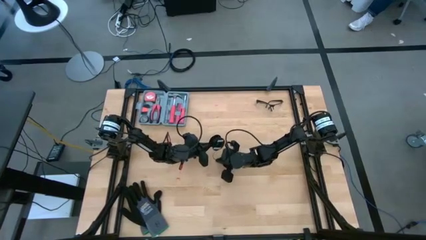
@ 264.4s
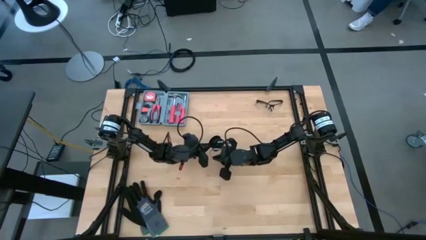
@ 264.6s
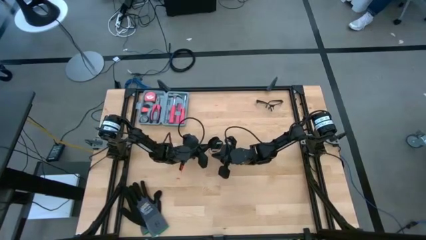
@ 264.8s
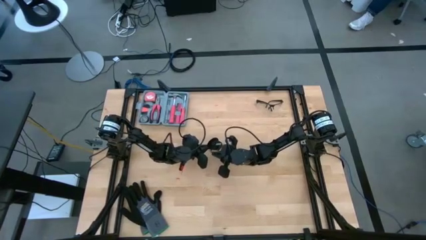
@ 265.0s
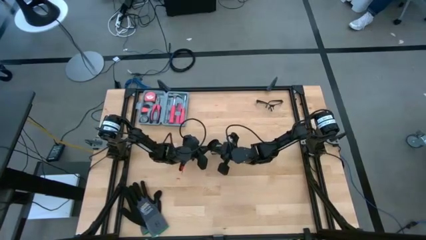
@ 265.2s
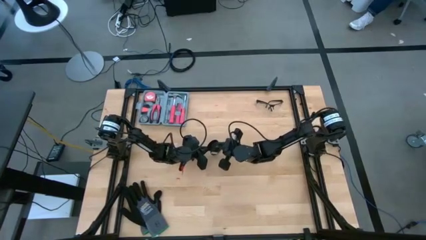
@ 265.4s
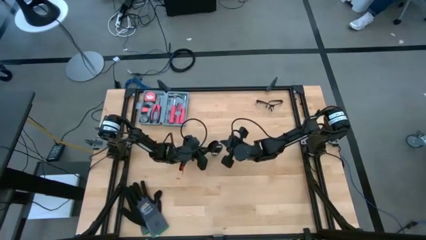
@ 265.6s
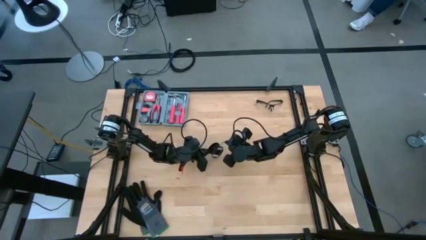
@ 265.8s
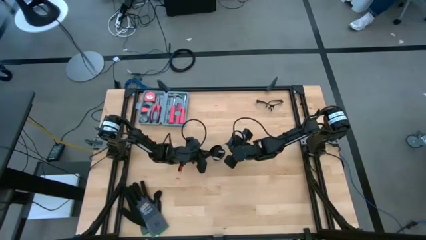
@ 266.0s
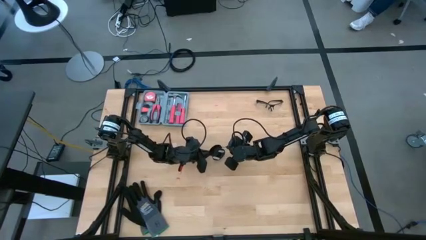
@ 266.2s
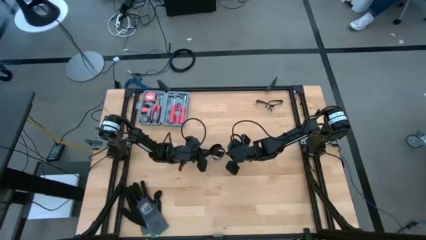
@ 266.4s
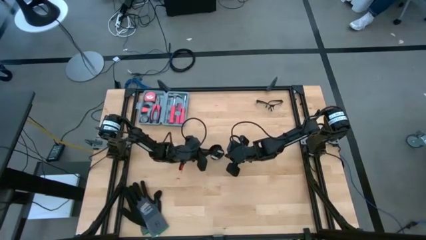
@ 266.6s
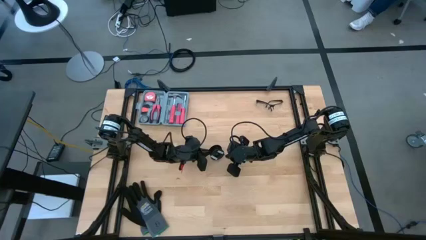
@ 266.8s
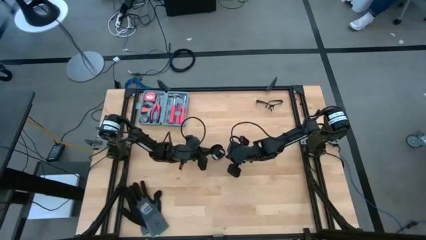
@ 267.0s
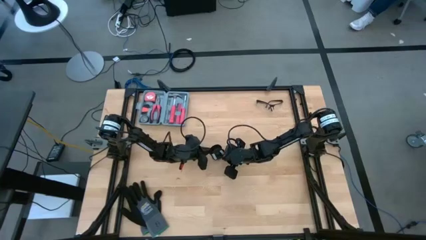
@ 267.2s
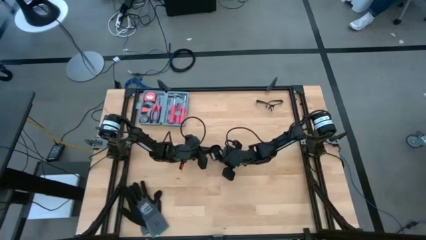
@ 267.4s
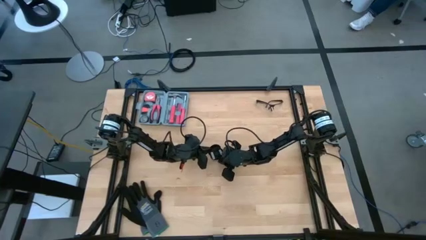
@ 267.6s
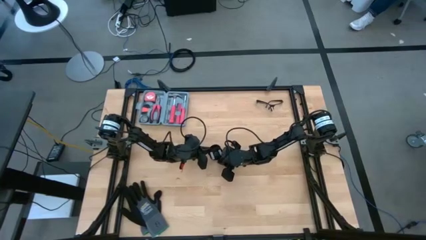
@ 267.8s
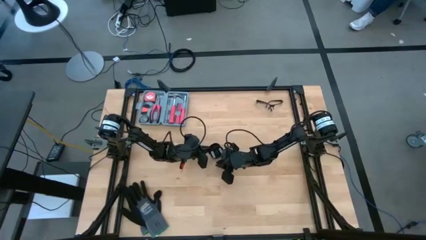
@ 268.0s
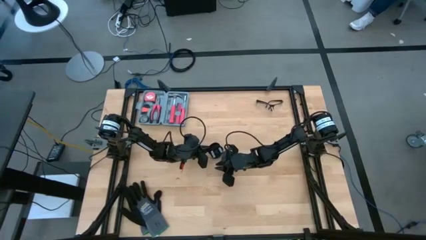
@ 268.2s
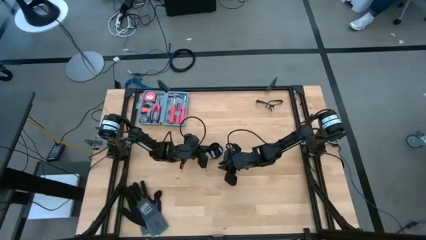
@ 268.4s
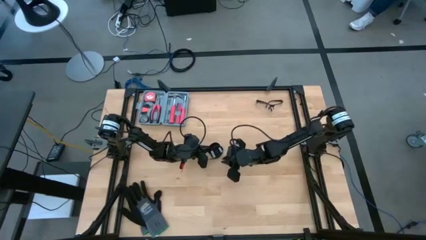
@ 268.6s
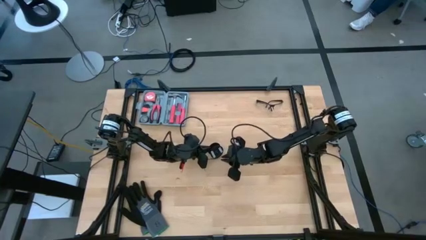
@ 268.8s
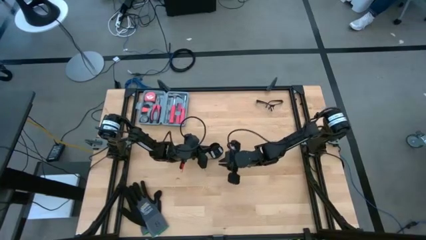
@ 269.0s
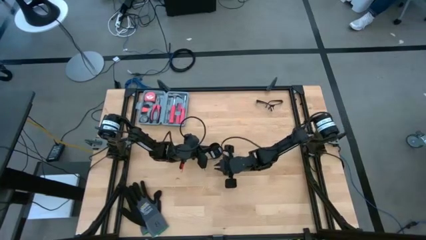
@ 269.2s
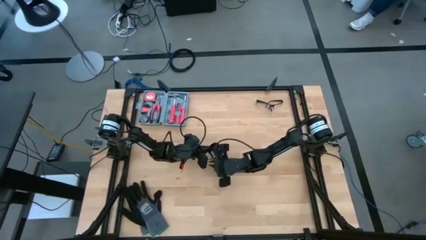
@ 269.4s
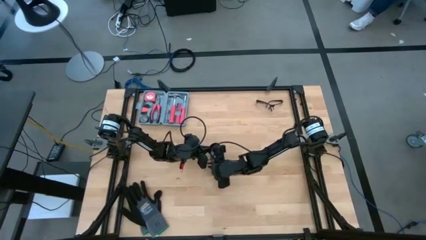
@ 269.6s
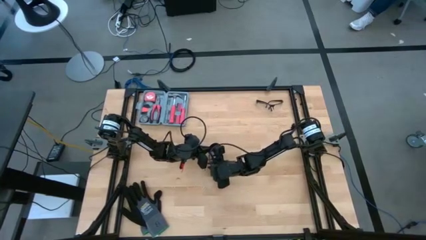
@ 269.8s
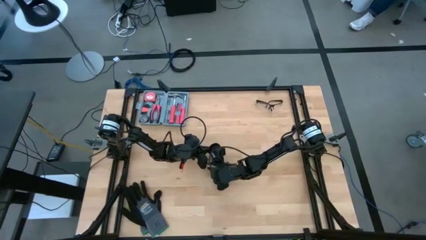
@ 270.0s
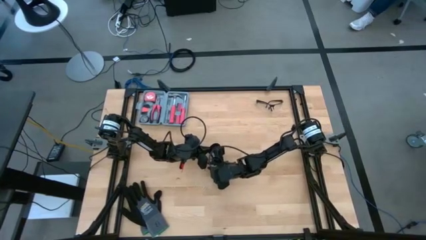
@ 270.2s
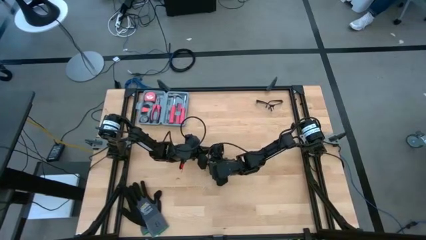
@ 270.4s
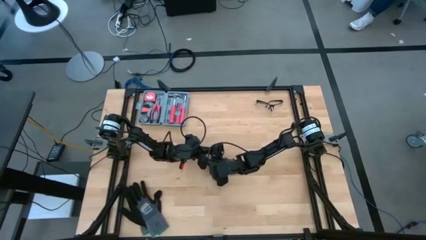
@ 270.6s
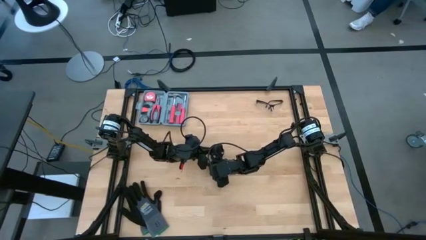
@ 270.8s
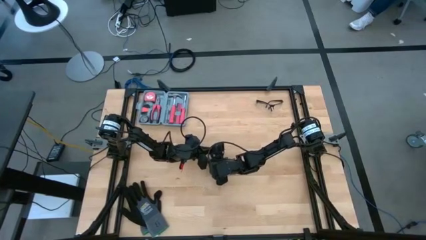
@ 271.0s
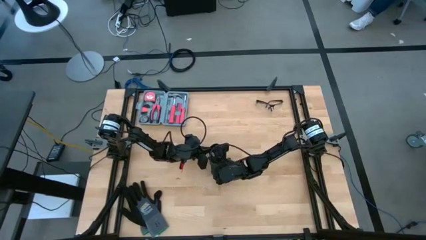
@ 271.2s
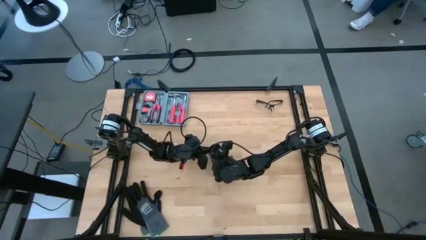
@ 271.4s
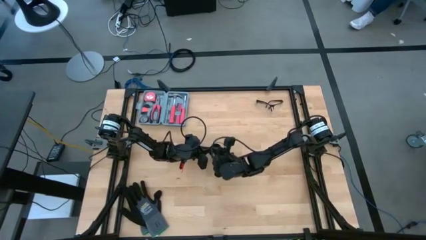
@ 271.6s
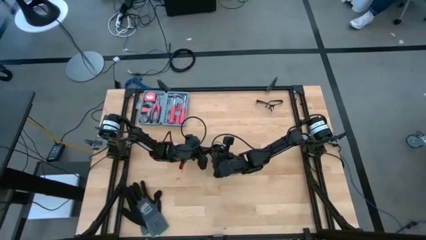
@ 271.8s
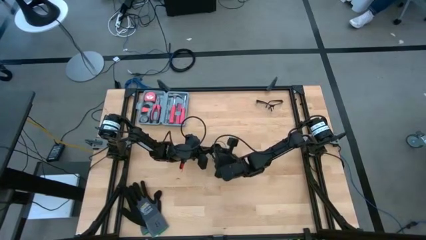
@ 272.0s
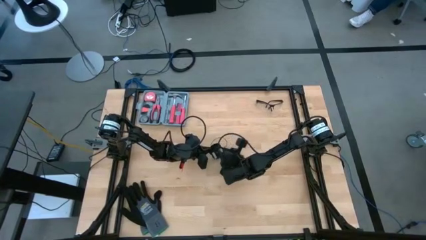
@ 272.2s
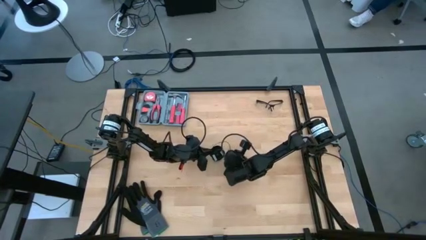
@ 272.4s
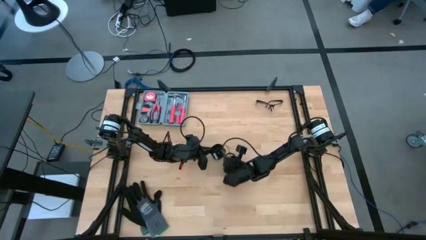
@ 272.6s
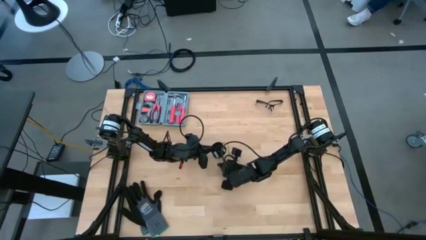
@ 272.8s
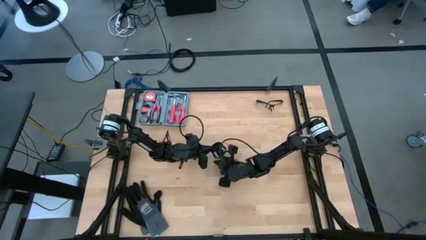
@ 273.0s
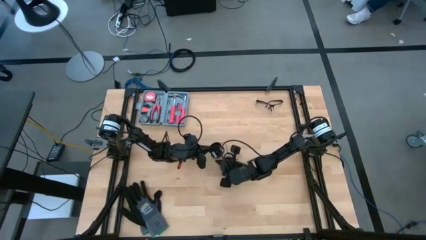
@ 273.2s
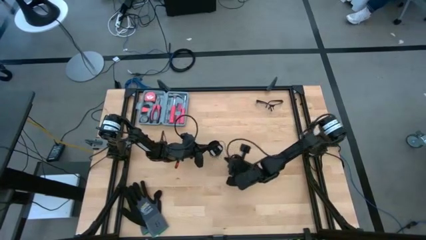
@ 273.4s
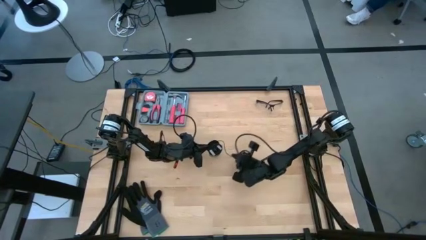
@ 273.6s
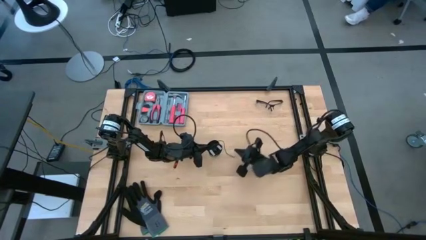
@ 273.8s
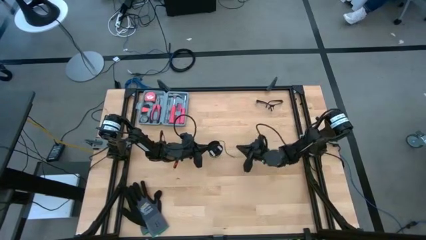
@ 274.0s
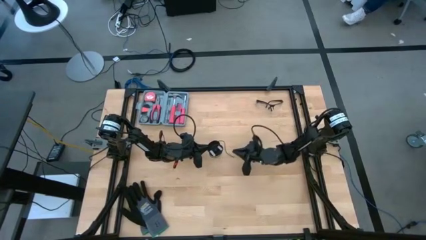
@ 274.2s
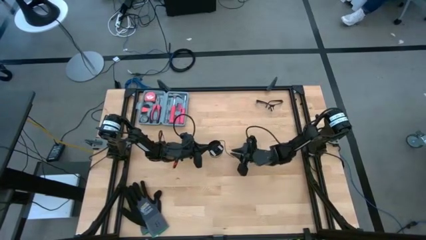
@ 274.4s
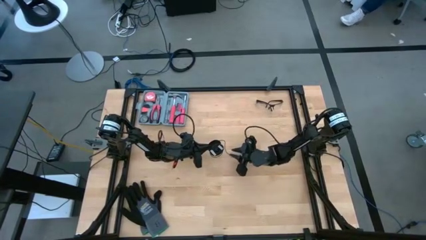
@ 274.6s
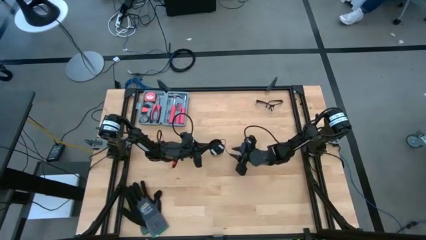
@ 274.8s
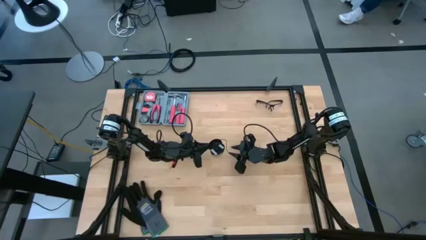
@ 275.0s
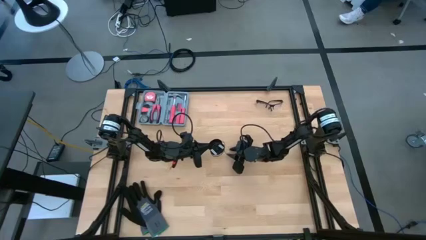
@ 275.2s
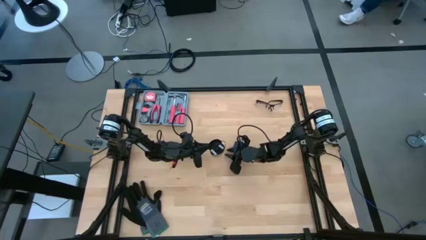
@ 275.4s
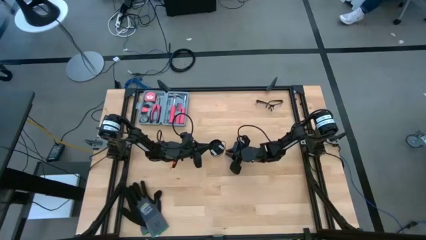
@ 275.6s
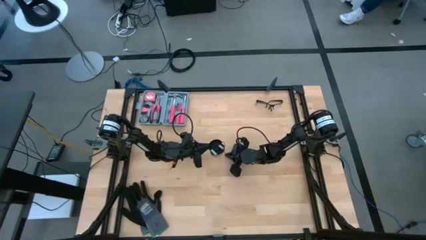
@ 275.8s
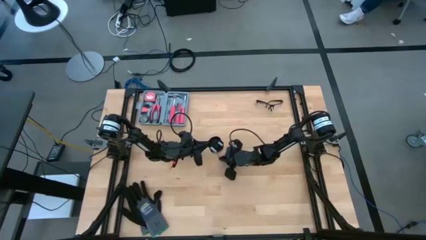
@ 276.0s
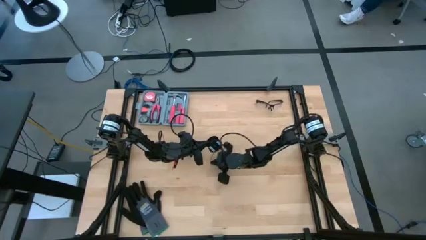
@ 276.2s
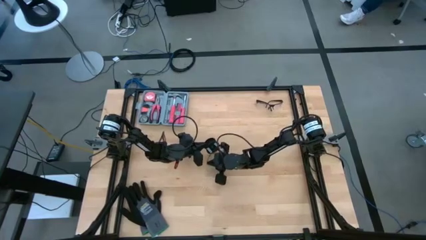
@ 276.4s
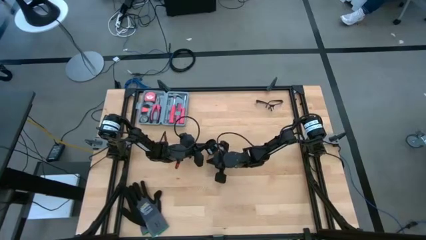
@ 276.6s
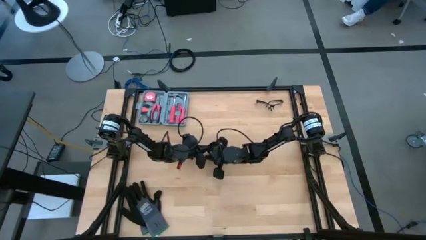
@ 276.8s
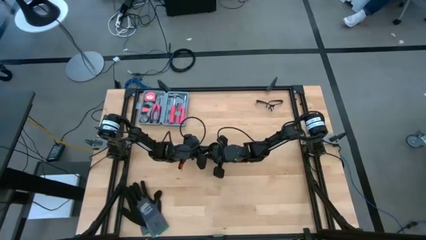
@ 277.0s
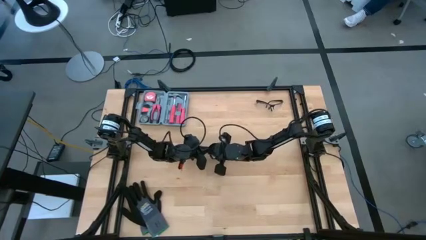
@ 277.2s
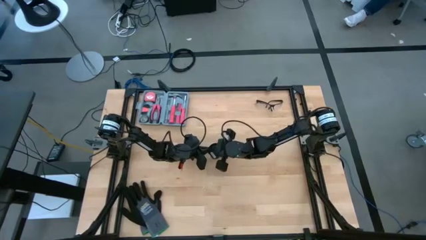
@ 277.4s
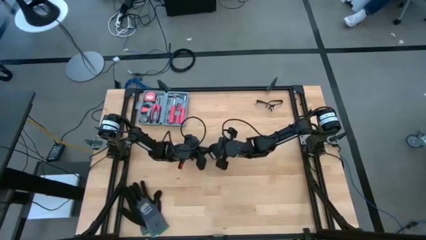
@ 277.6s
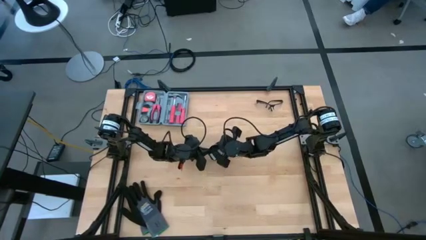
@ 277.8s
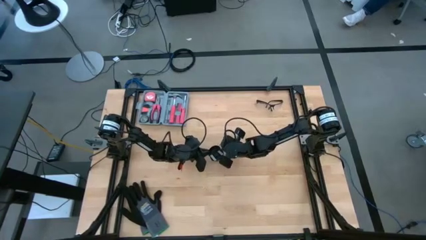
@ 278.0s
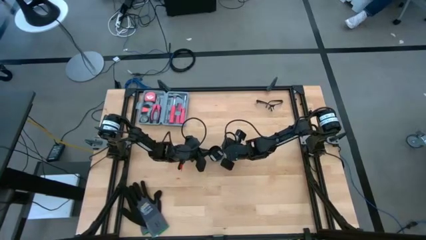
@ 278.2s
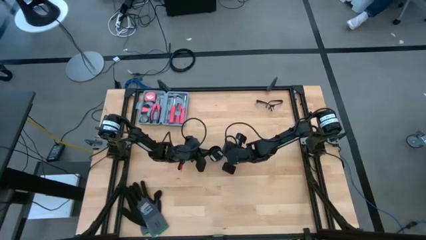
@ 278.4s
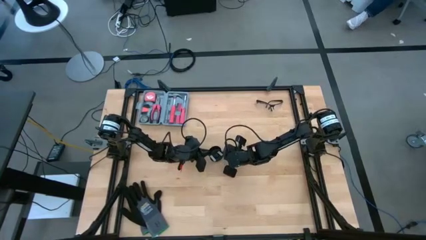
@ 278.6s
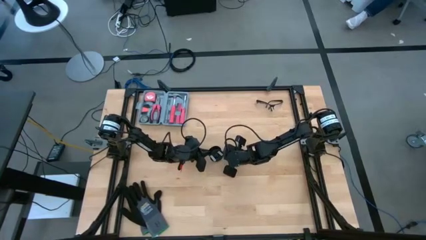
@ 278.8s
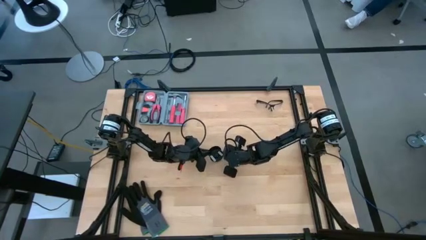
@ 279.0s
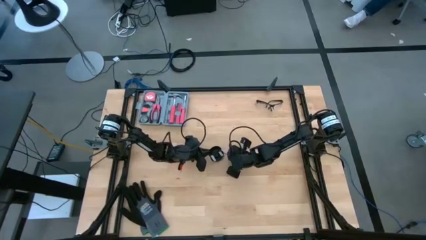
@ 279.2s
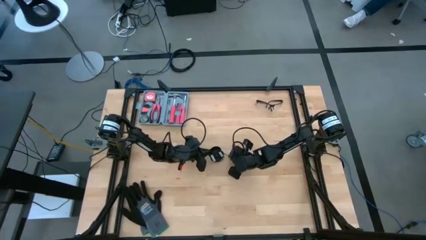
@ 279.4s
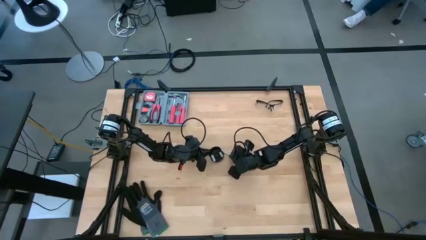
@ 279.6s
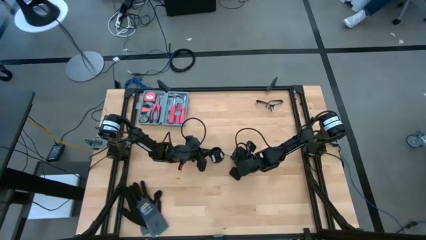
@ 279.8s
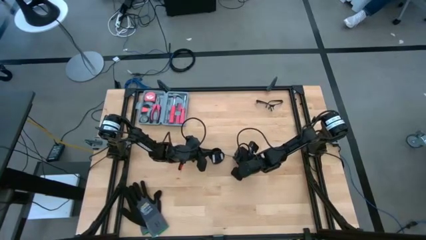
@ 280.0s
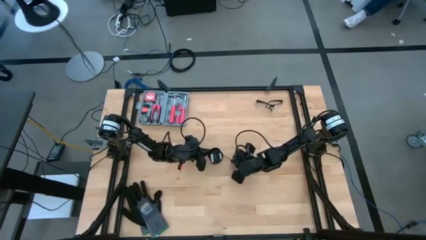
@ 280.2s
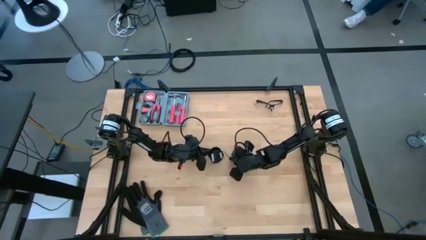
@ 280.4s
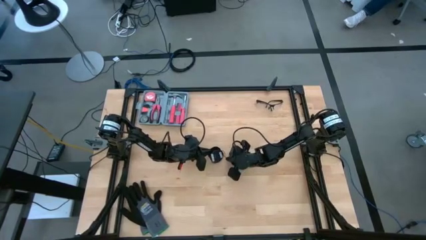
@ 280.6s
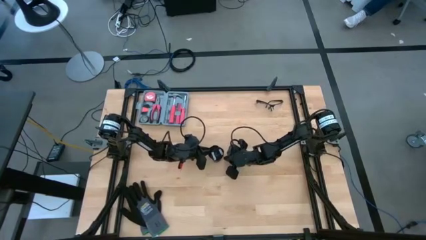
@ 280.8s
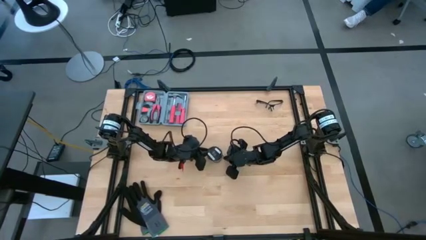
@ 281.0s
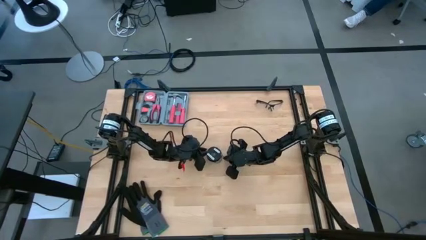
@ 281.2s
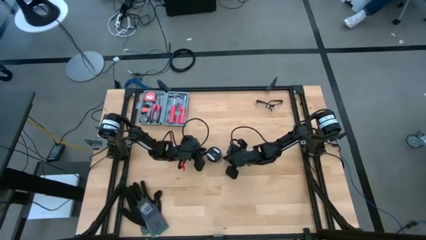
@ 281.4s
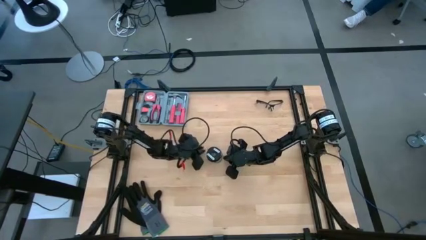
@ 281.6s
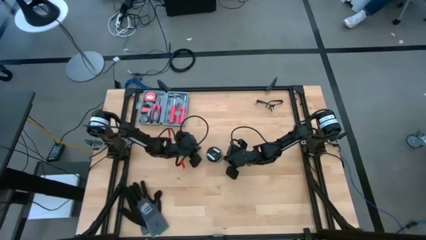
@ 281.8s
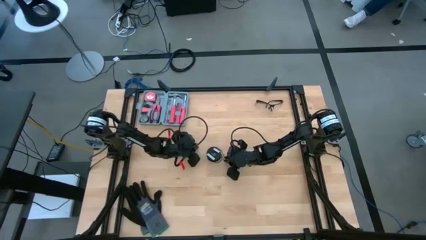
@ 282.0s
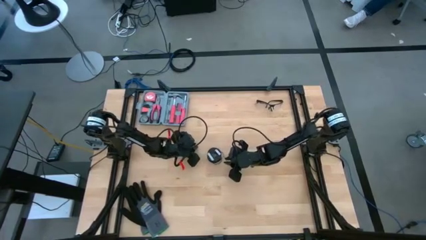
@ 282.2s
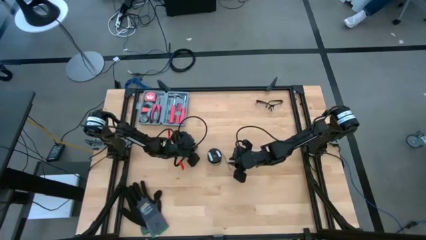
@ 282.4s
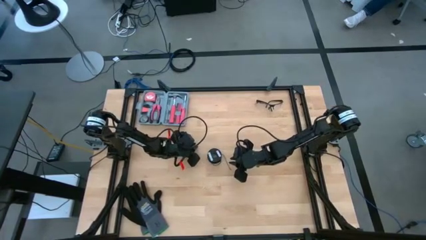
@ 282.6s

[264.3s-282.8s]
Task: Coil cords
Coil the black wire on the black spool
